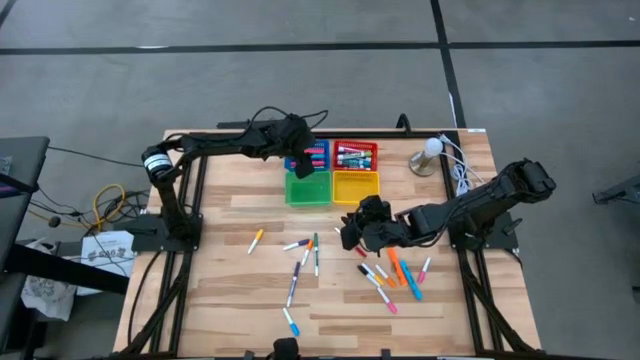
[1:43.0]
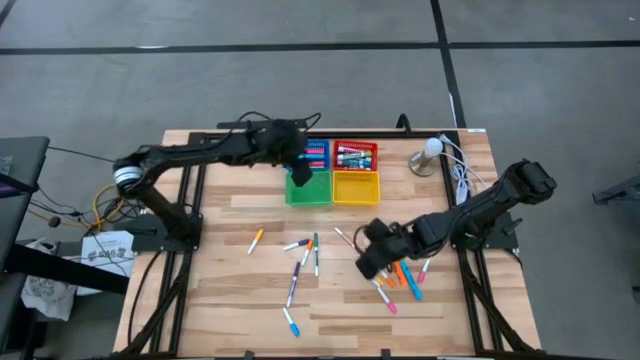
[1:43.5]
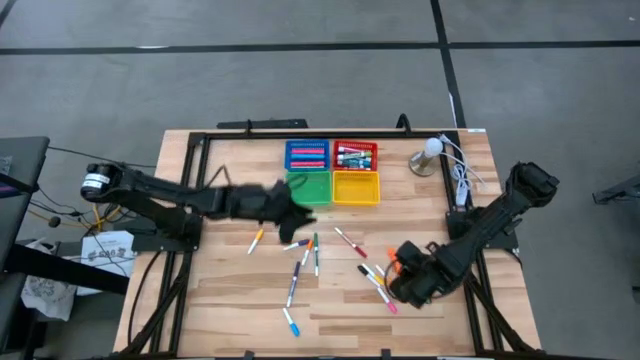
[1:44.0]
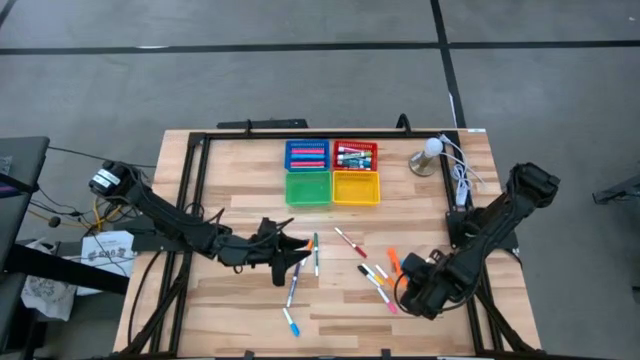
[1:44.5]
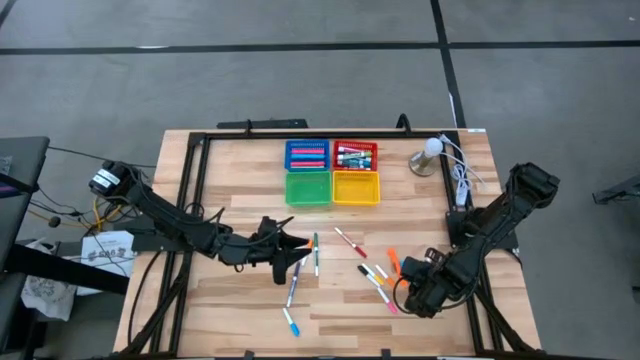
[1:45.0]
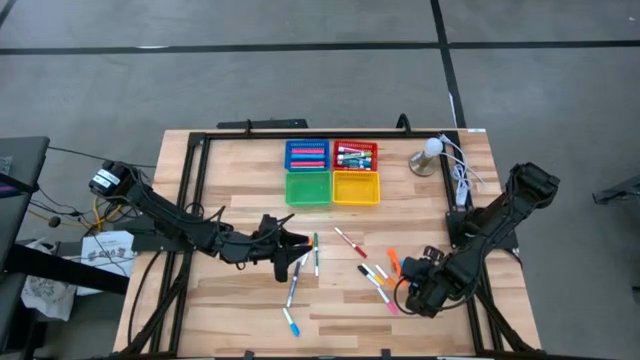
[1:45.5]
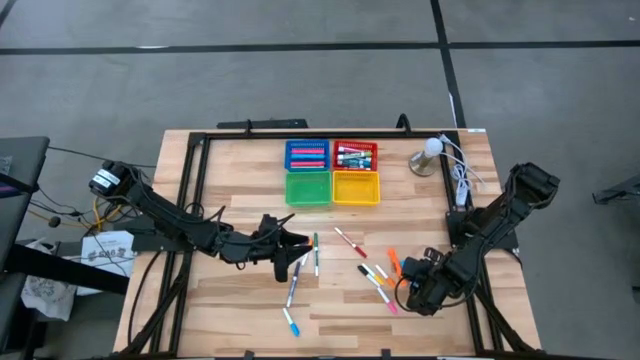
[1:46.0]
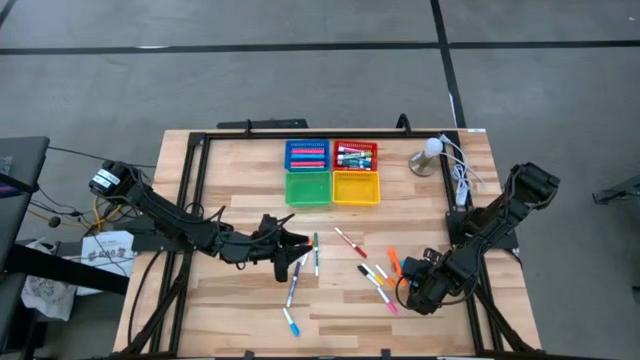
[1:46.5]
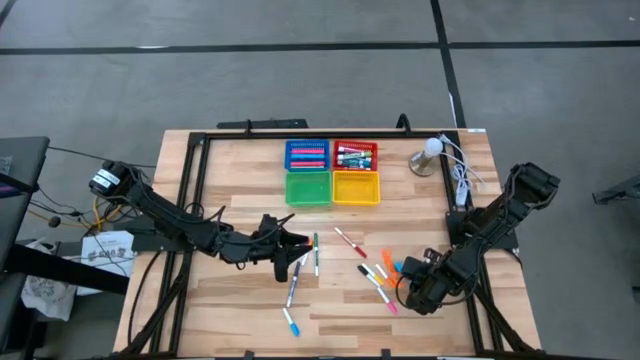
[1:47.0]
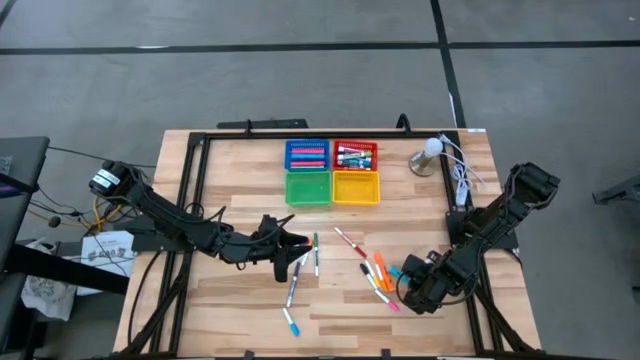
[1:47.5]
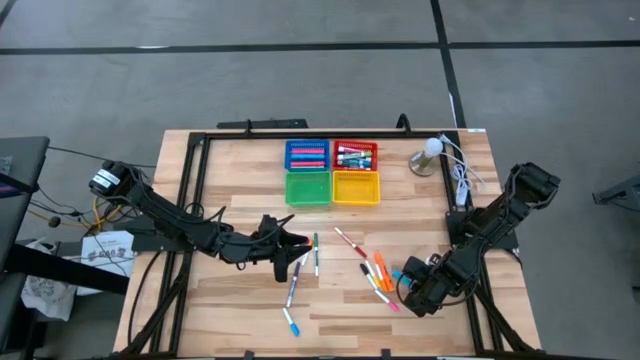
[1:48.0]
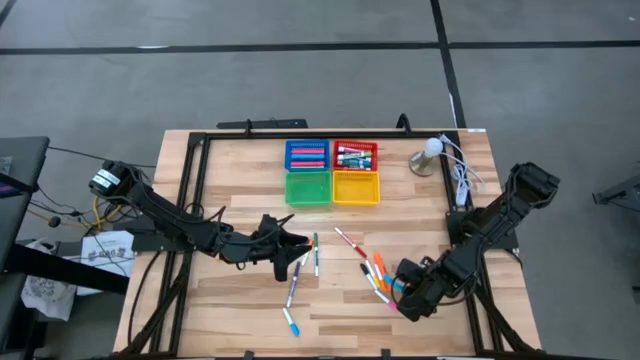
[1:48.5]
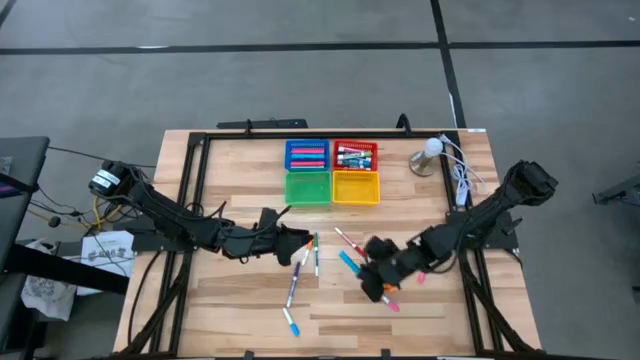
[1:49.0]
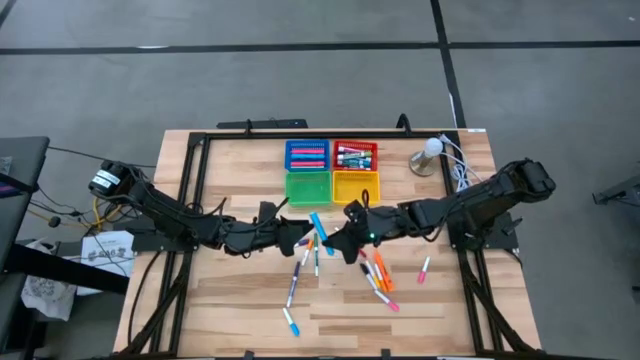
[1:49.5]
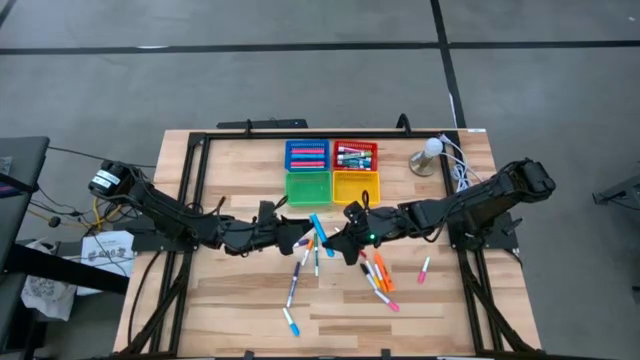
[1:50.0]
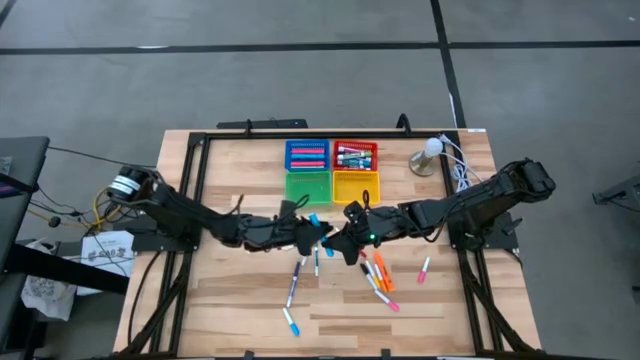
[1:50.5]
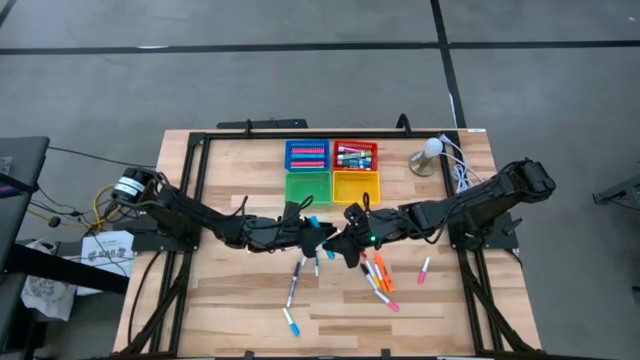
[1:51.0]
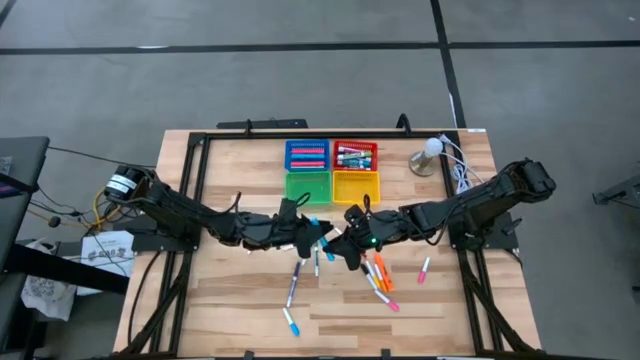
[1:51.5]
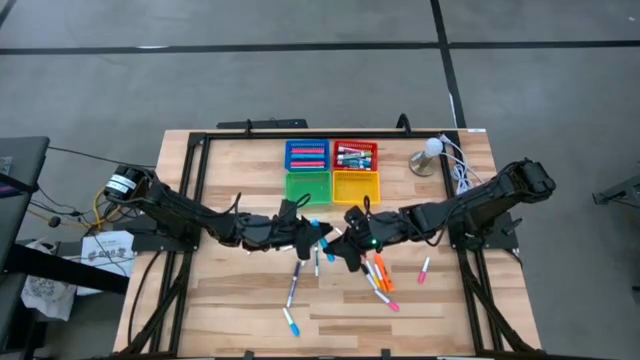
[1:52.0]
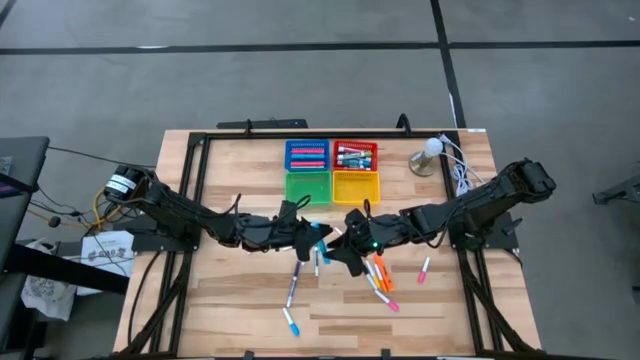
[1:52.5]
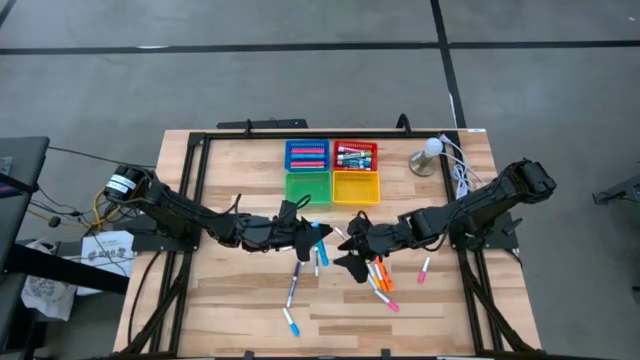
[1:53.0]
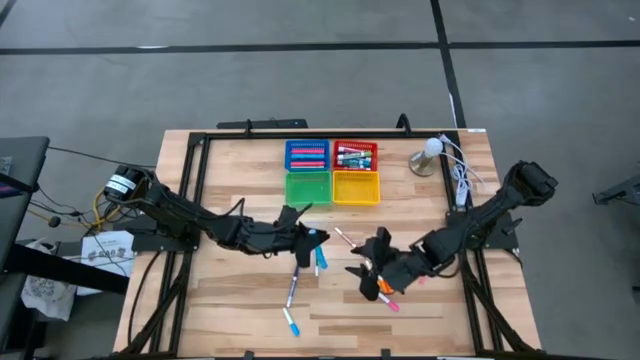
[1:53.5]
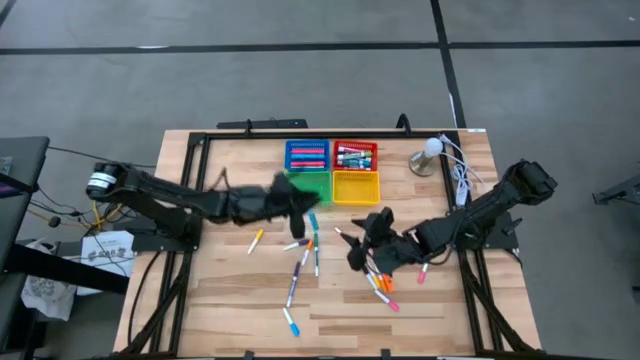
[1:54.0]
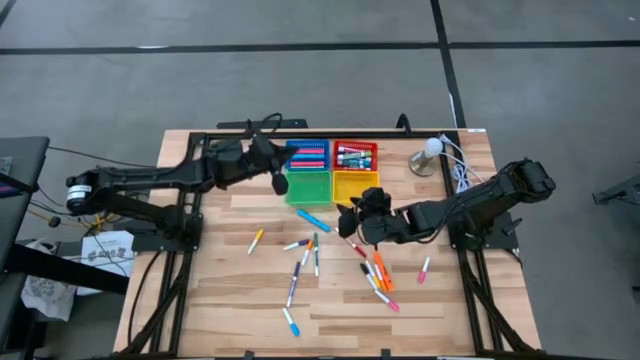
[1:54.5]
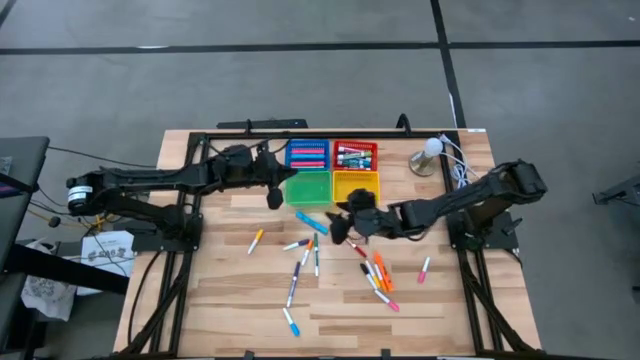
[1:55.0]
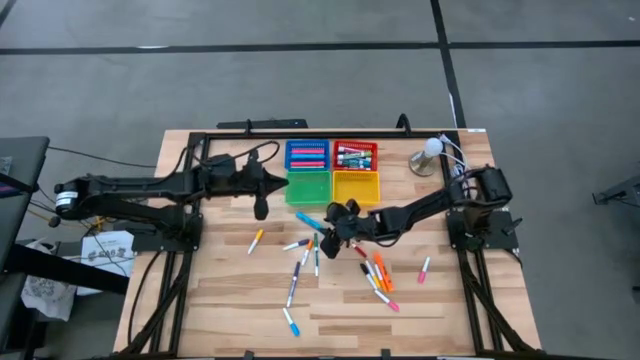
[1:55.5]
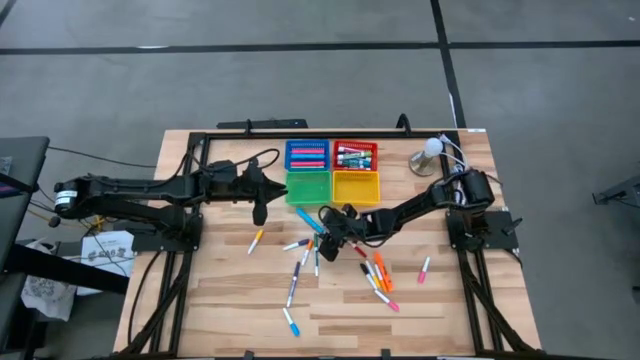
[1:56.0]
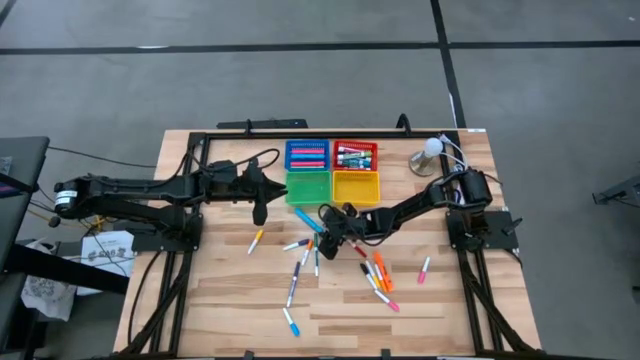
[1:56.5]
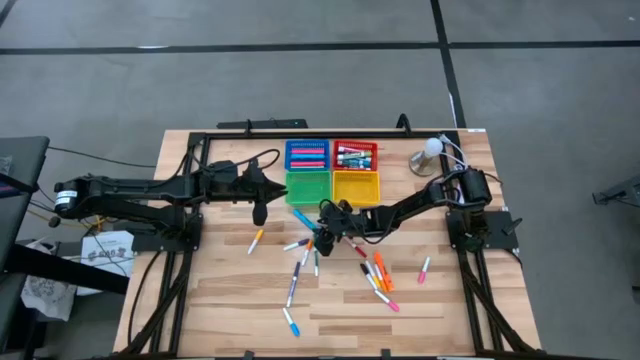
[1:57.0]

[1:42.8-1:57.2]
Task: Pick & Place Markers
Put the blue highlighter into the blue bin

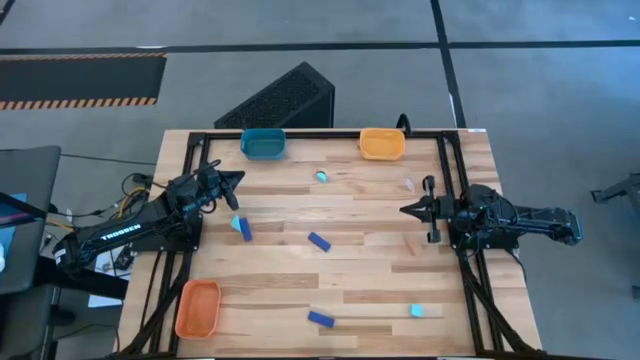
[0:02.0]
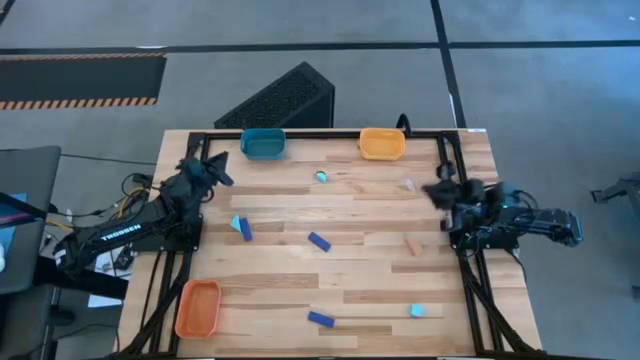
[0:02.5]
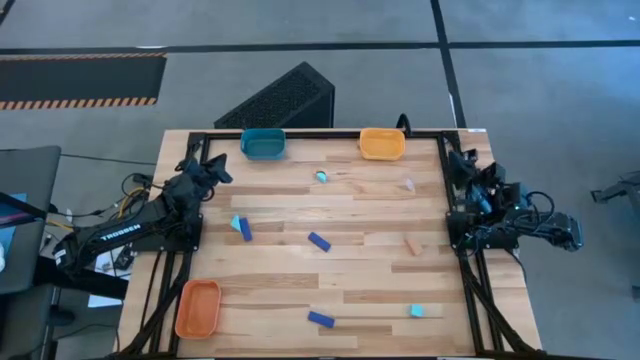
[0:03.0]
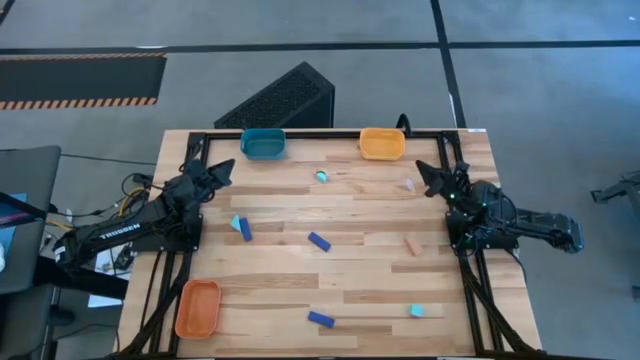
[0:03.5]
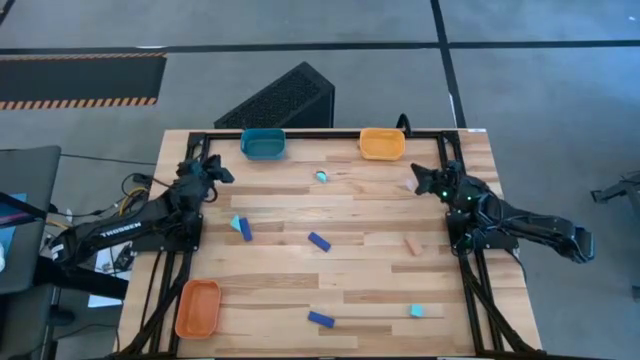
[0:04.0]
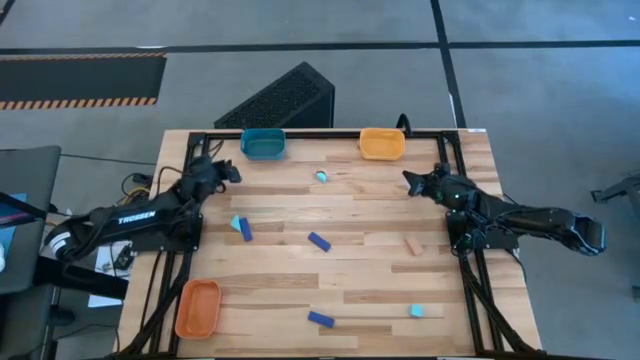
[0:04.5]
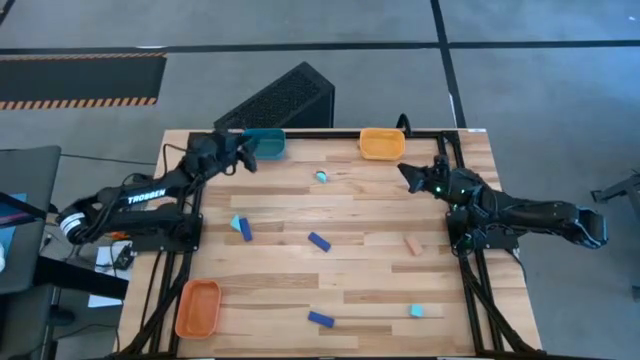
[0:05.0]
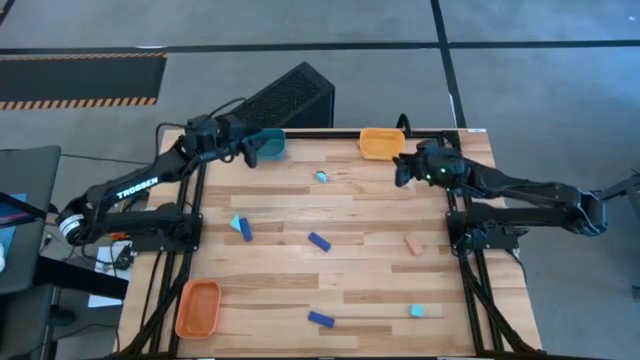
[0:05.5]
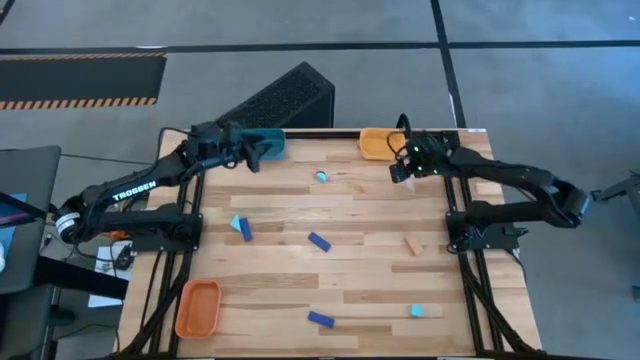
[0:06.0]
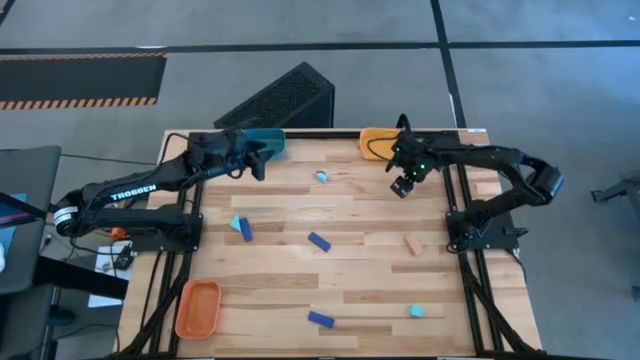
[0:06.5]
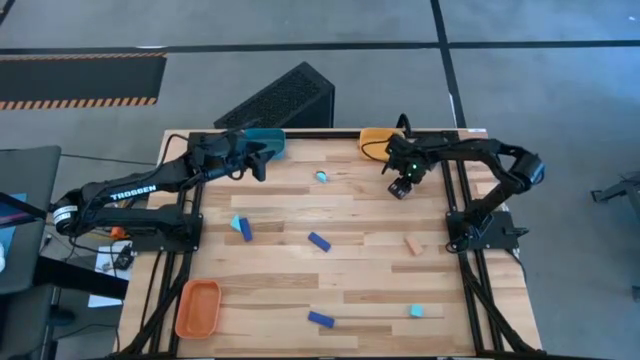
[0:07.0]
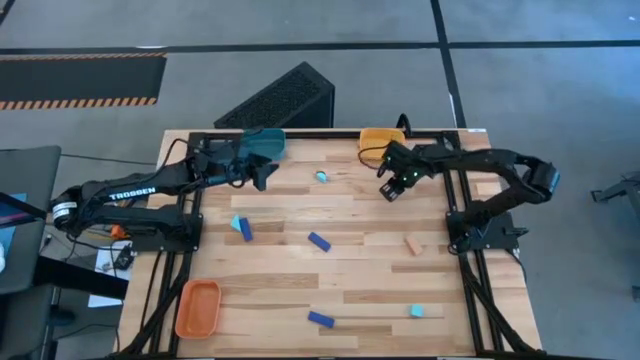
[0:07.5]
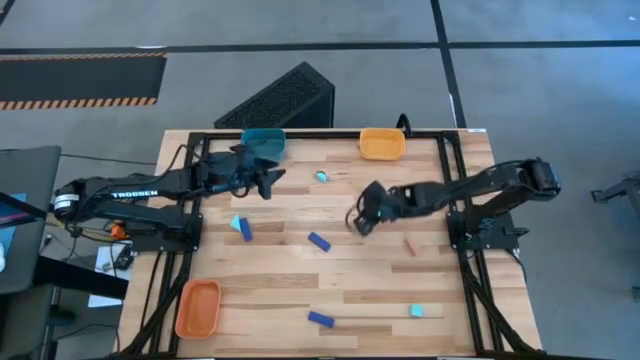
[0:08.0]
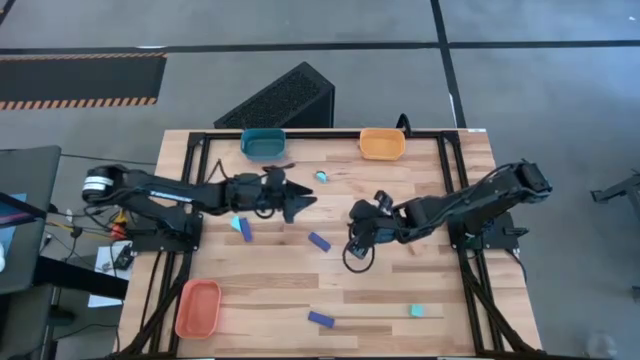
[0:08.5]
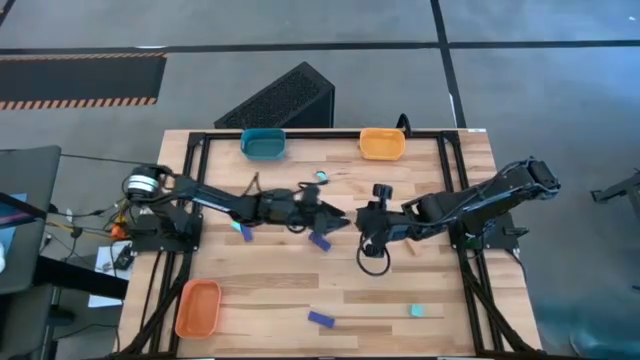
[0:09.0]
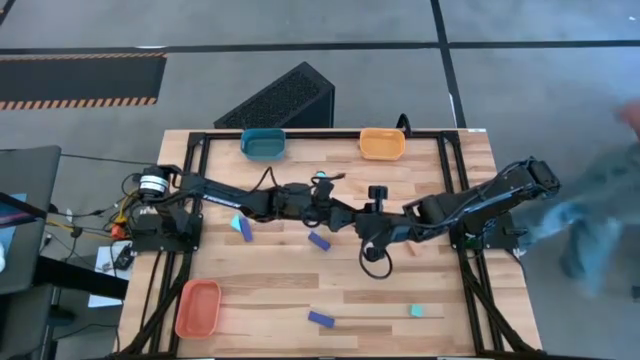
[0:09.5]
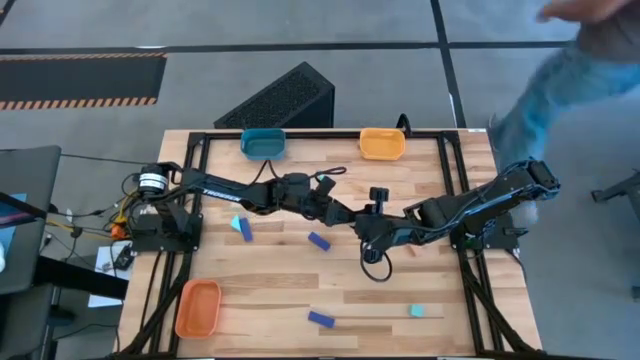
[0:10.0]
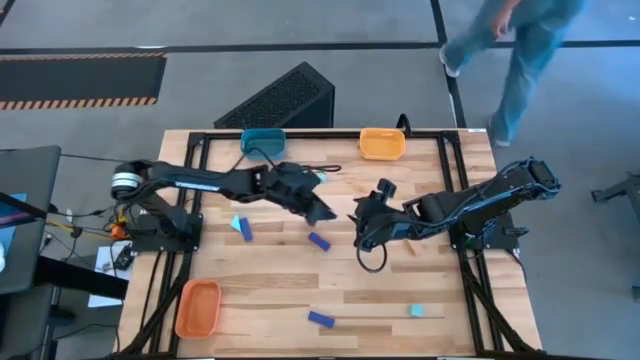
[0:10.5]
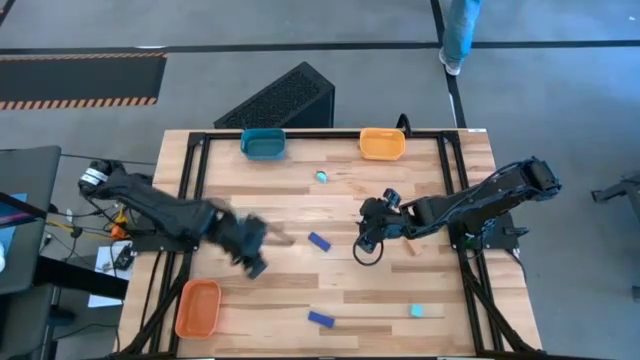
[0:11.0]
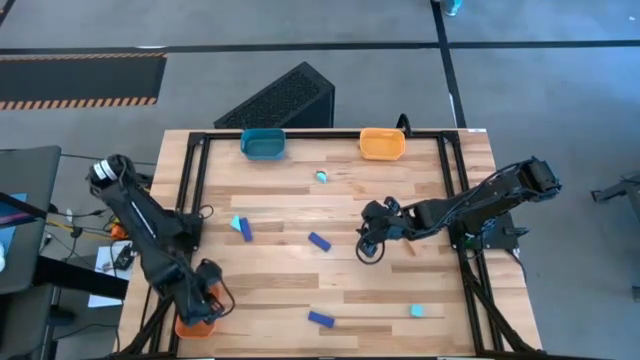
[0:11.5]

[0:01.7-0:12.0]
Task: Sort & place blocks by color
Put the top right brown block into the orange bin
